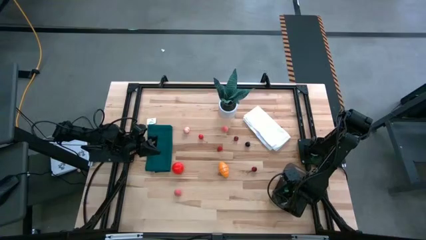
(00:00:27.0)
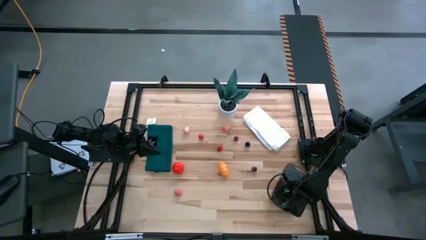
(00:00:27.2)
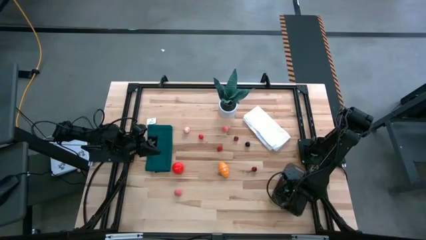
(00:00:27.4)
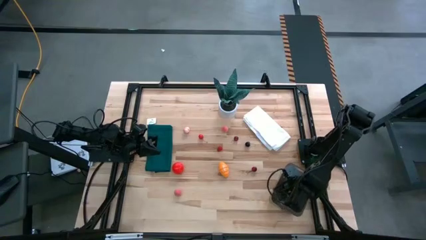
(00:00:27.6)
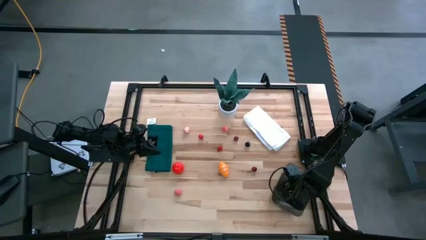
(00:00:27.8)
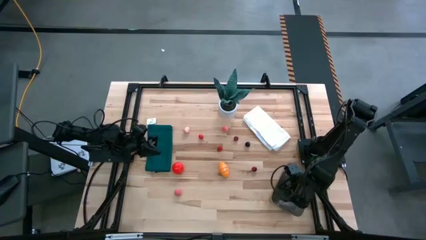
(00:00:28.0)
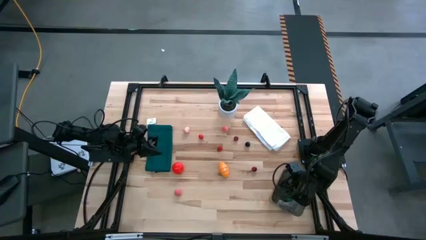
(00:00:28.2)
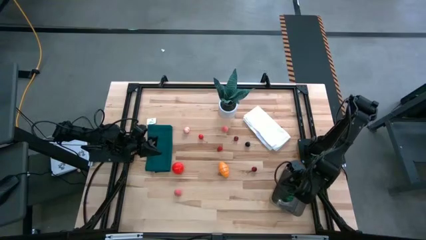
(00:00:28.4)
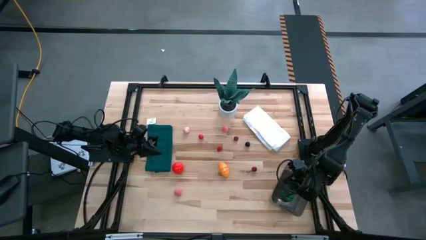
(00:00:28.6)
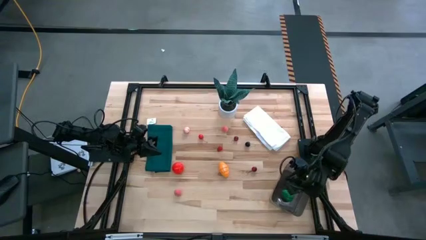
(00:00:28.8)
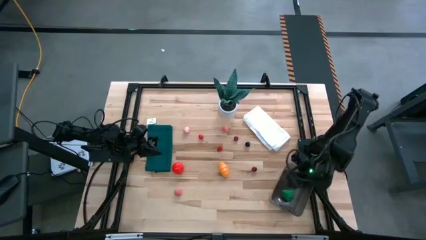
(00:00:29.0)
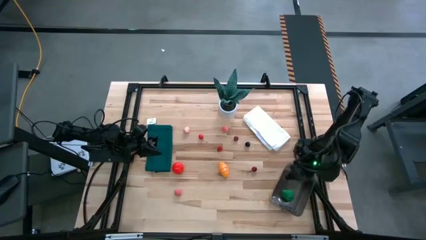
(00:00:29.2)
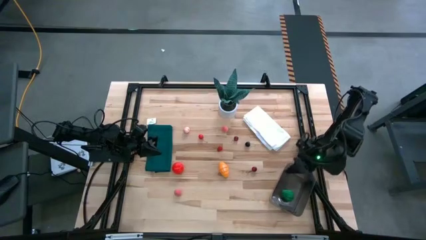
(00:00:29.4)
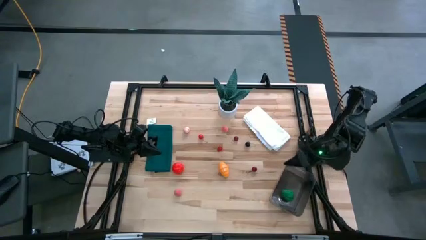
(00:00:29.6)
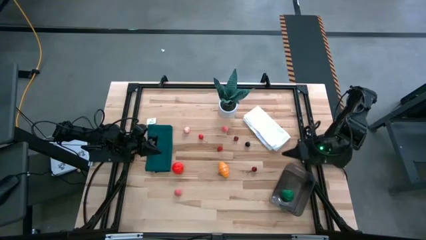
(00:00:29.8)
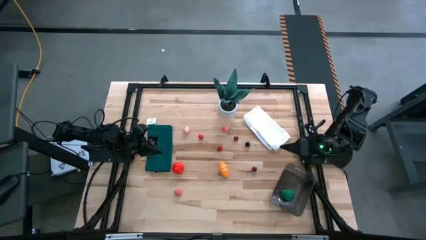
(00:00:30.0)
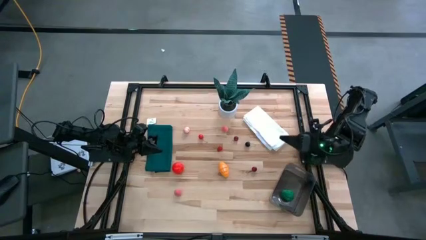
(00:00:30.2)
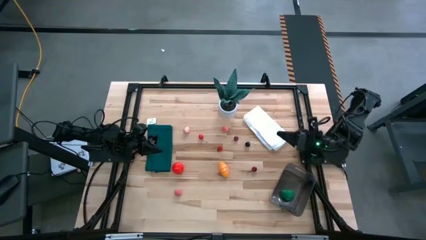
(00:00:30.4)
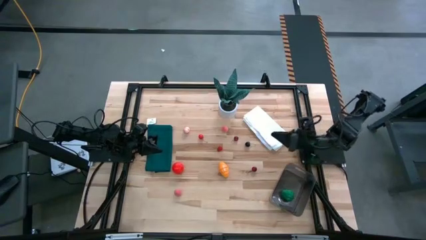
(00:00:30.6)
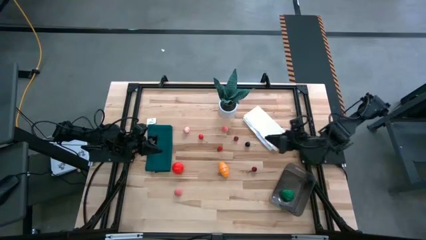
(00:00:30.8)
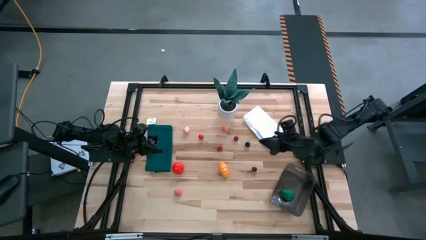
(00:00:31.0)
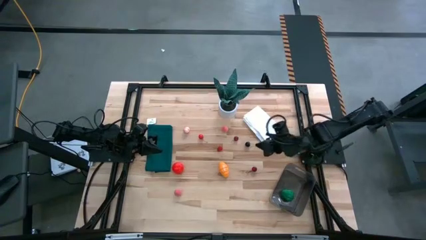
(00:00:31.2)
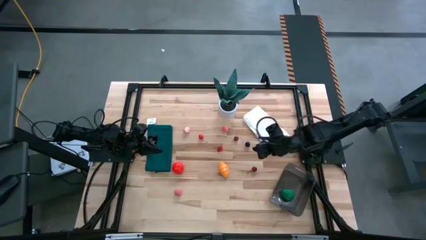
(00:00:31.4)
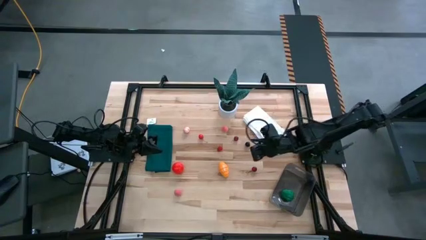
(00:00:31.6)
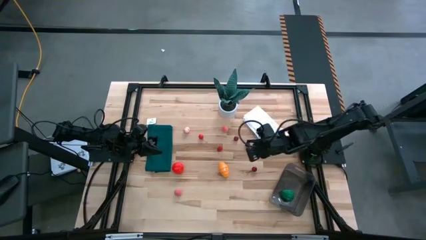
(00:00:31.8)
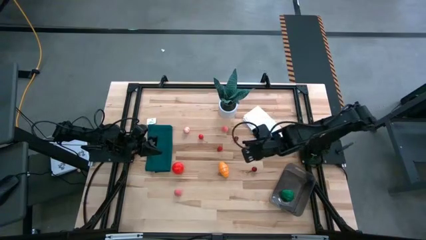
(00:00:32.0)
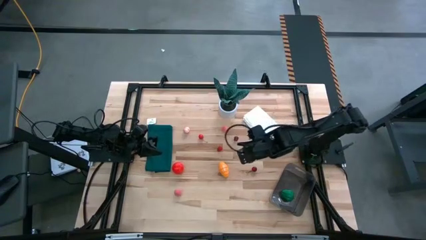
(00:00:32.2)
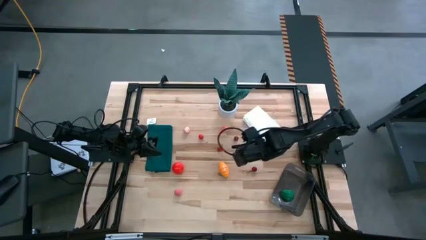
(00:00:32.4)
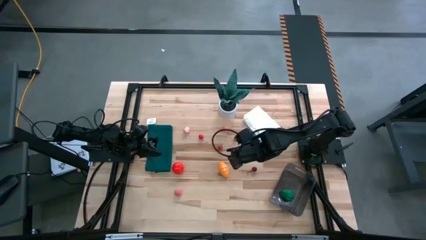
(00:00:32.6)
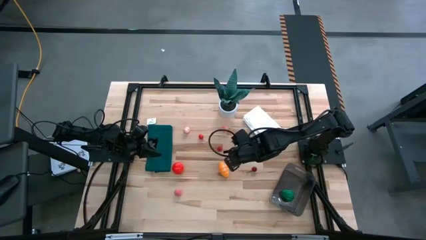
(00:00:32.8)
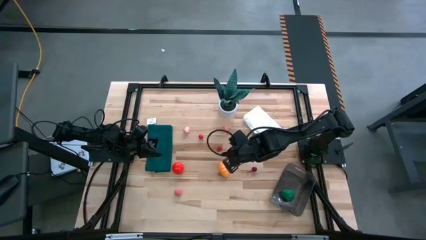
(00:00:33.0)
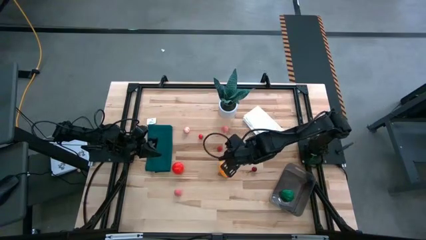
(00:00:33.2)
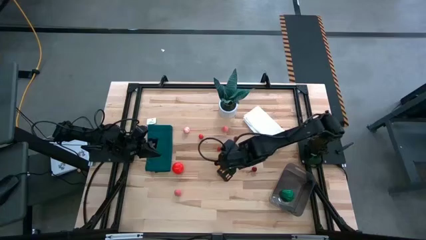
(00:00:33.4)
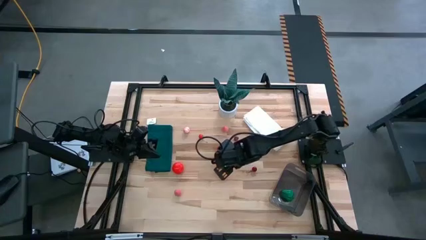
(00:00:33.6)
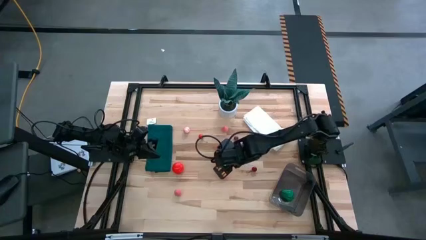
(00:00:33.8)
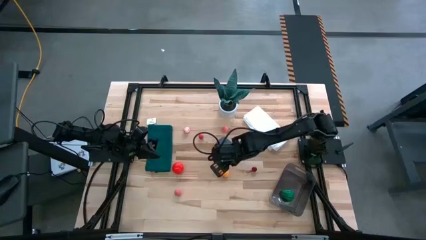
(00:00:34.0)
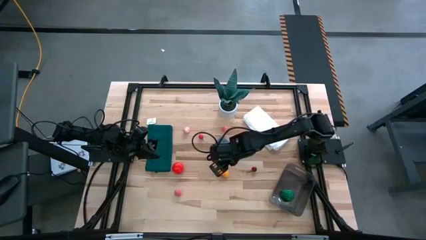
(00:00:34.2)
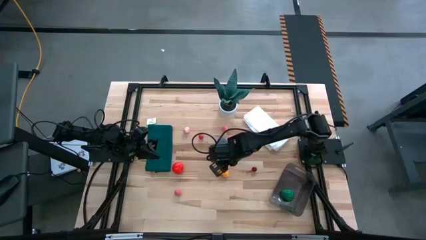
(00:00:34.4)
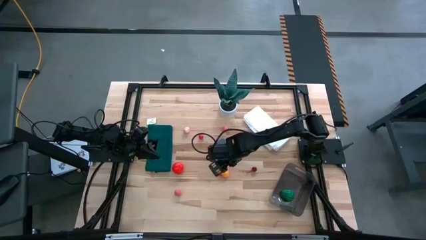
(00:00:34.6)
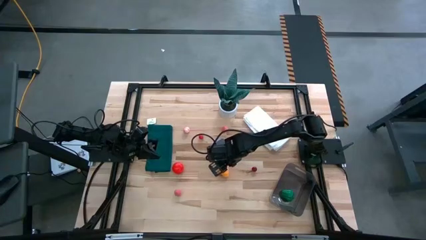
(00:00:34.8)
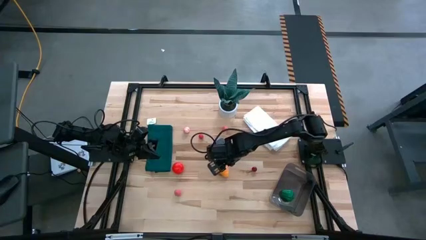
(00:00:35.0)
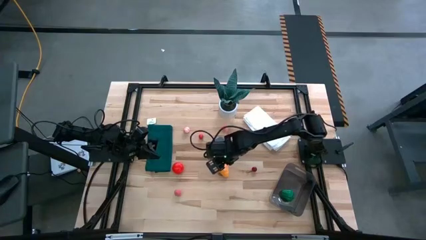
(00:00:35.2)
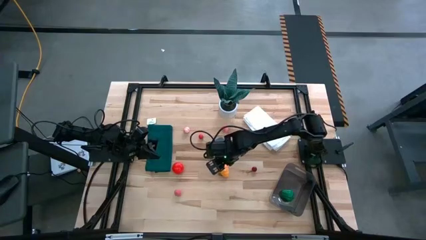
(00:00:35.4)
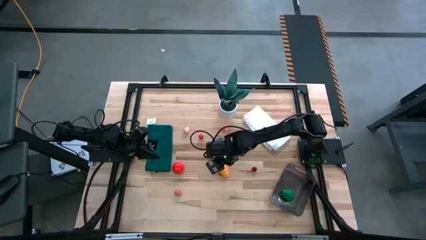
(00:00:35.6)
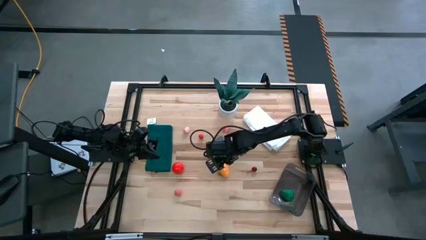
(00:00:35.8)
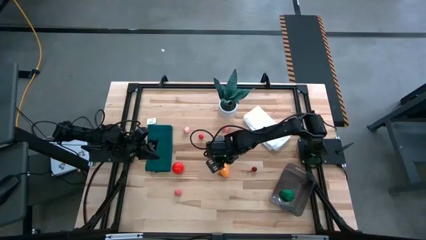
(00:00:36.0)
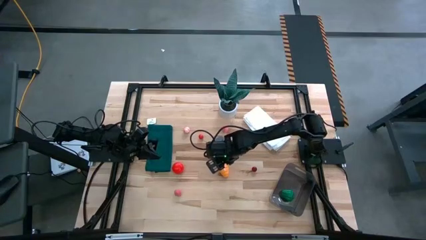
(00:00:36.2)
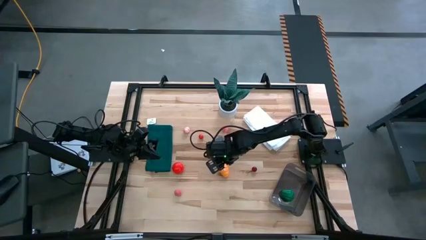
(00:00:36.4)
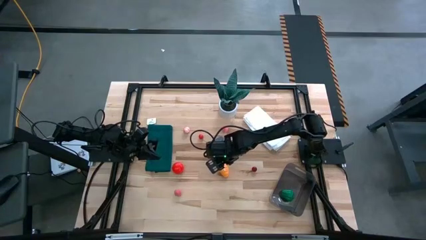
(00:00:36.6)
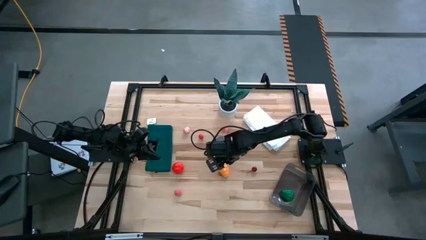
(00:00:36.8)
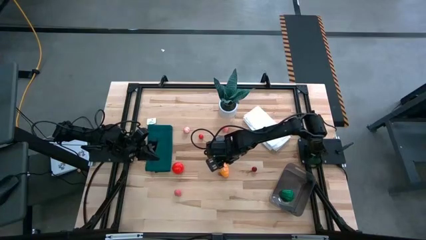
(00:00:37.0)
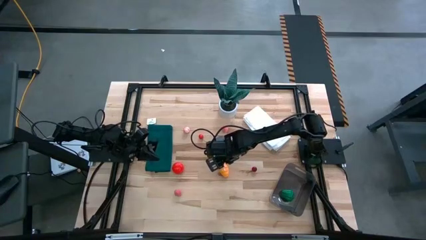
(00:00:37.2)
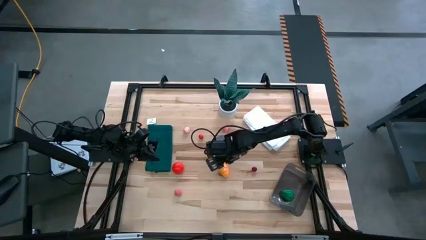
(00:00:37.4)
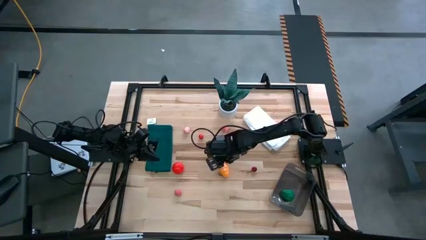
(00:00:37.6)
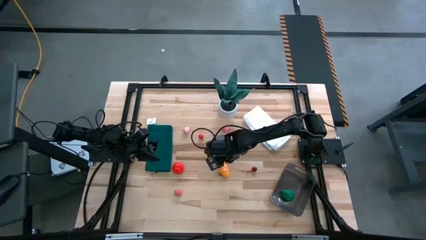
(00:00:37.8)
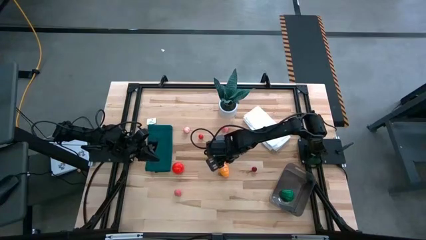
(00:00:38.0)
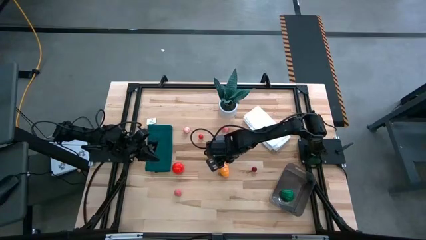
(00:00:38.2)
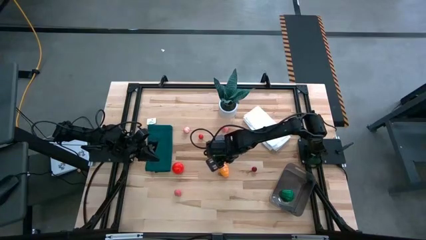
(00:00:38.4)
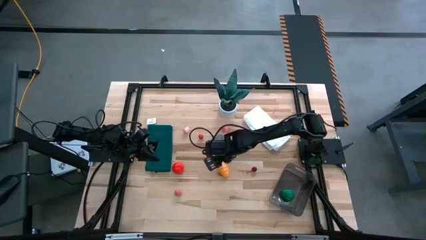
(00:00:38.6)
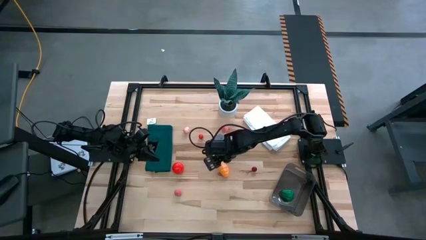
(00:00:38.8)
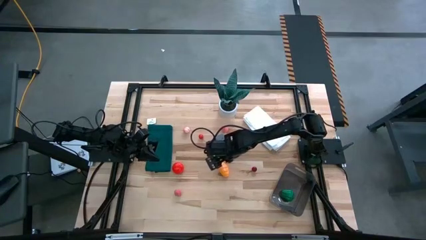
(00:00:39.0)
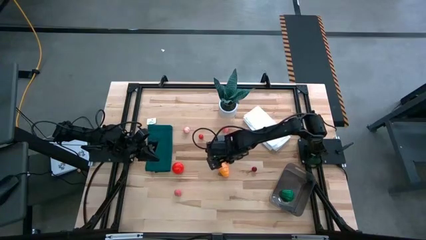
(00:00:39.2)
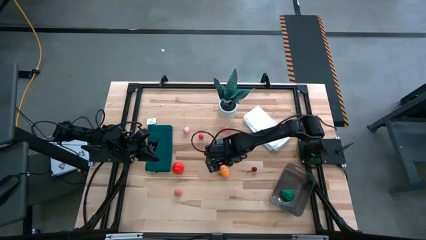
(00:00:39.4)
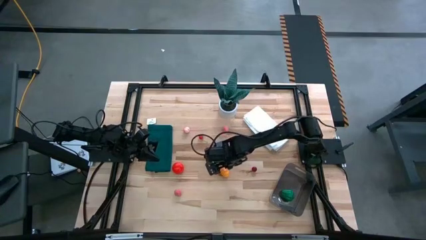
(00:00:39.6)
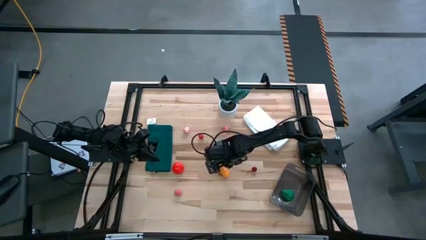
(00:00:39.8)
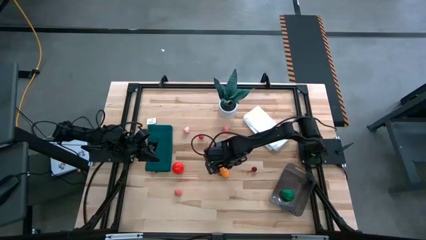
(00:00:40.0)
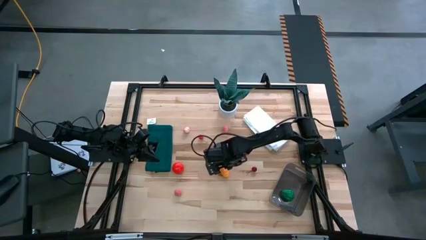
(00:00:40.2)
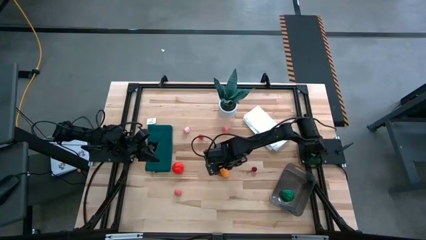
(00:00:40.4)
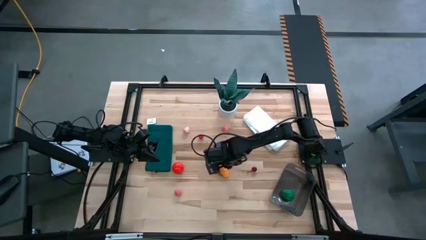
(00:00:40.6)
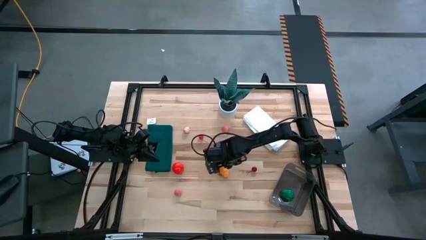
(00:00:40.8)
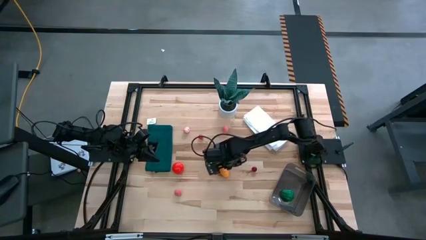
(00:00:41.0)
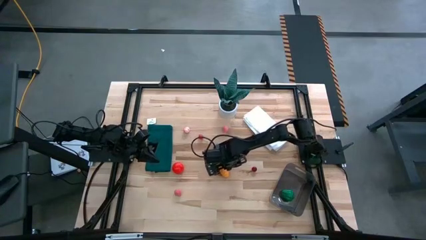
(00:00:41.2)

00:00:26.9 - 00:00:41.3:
Task: Pick and placing Produce into tupperware
Put the orange croissant into the black bin
